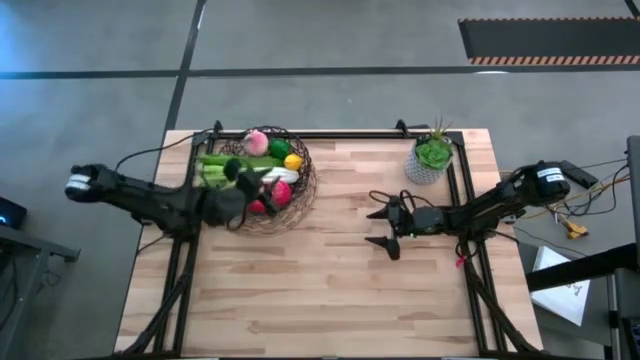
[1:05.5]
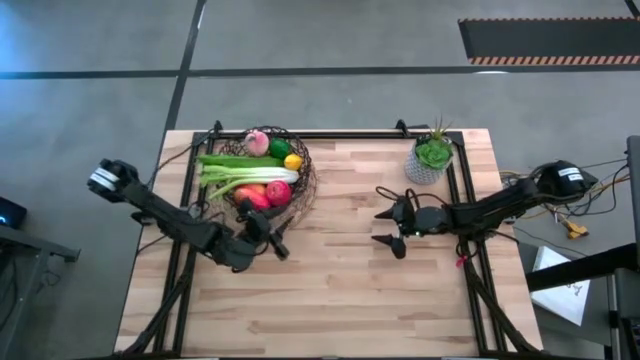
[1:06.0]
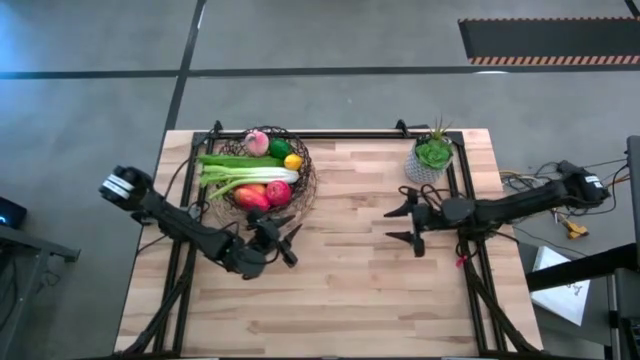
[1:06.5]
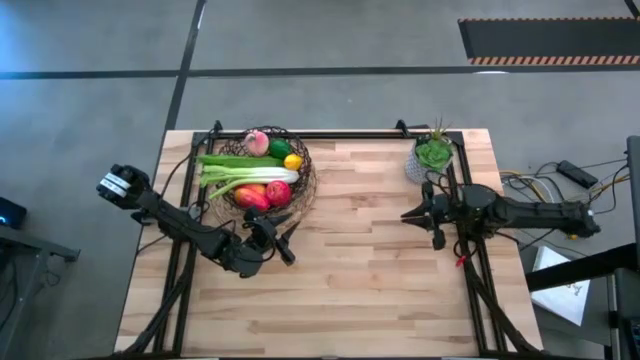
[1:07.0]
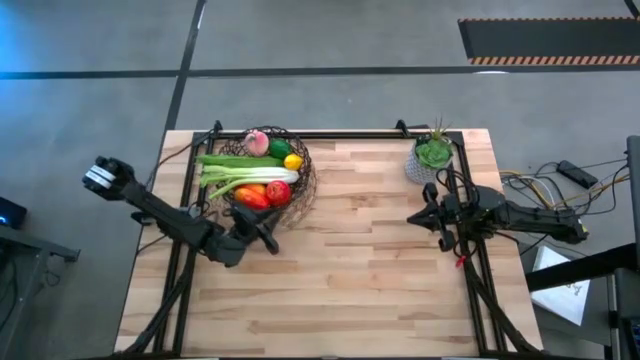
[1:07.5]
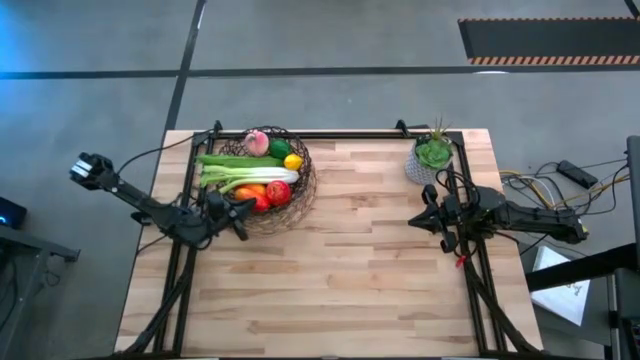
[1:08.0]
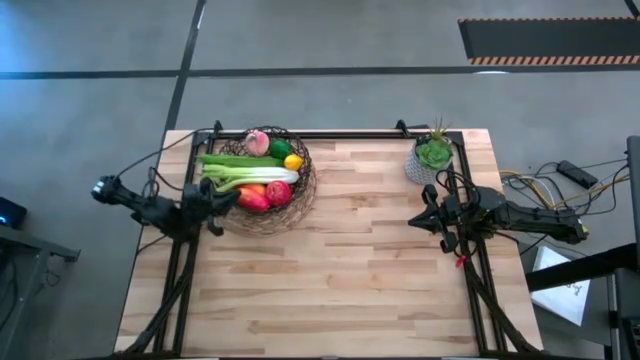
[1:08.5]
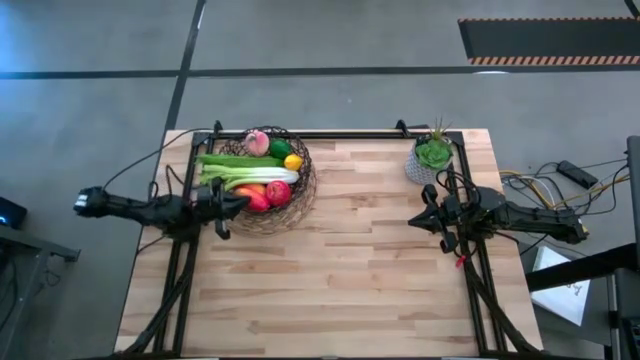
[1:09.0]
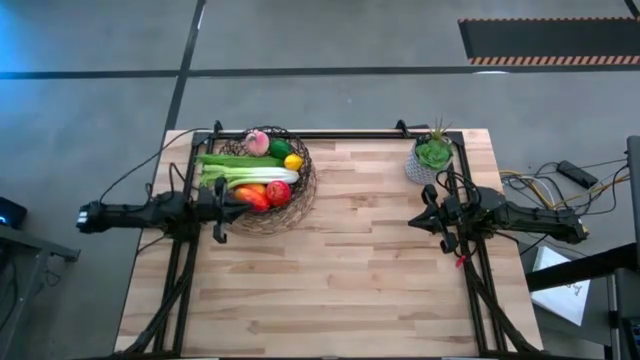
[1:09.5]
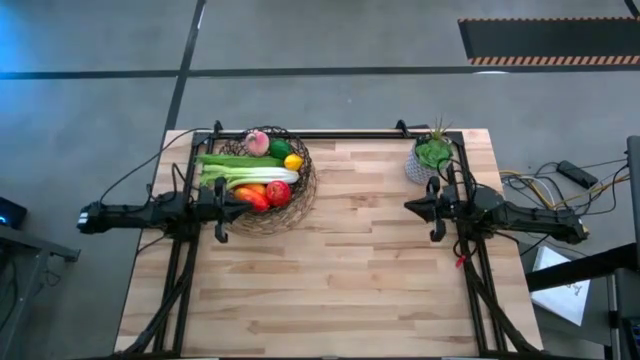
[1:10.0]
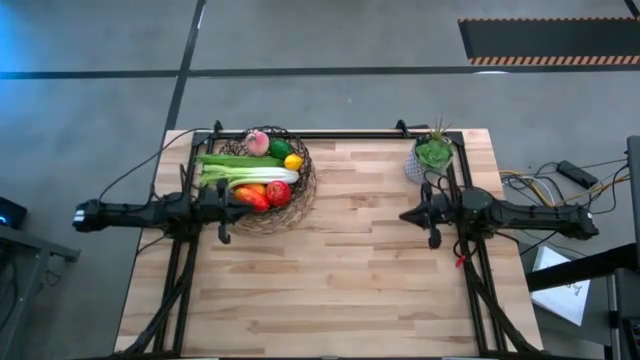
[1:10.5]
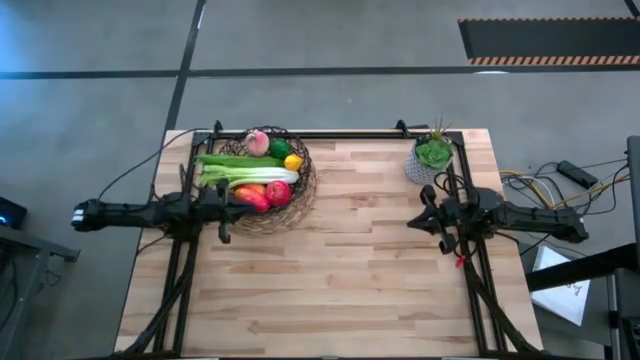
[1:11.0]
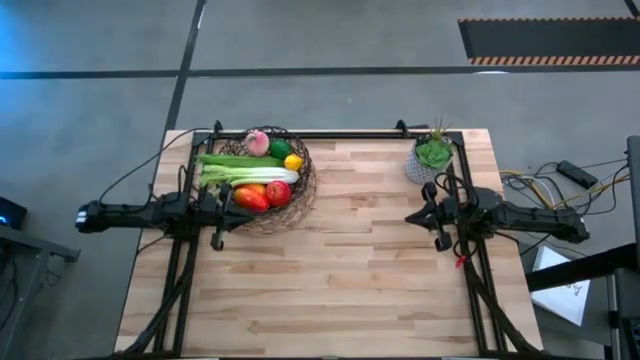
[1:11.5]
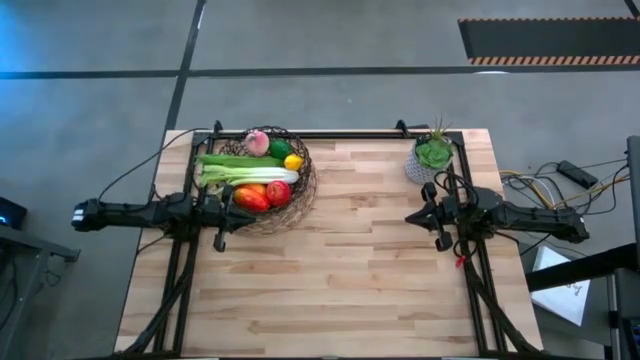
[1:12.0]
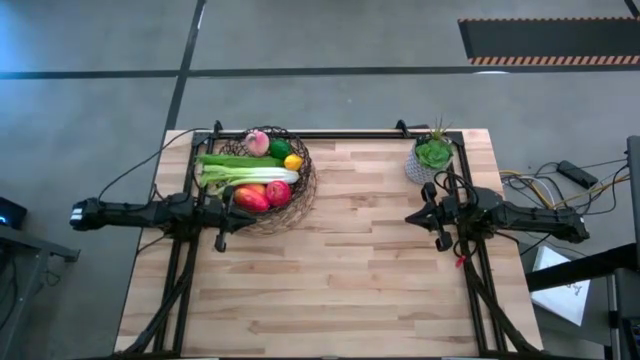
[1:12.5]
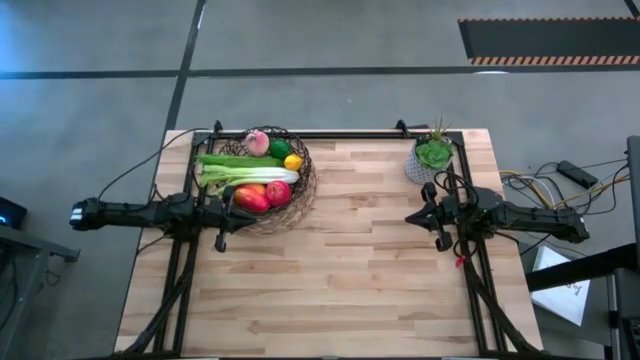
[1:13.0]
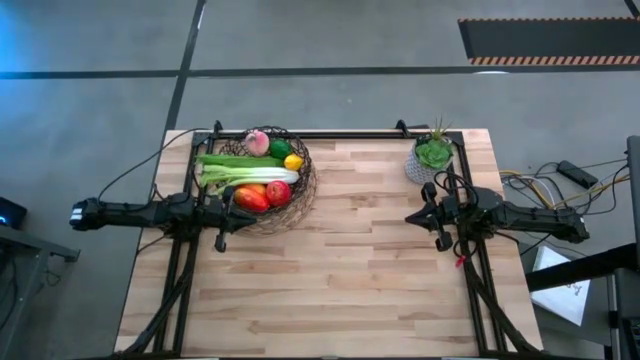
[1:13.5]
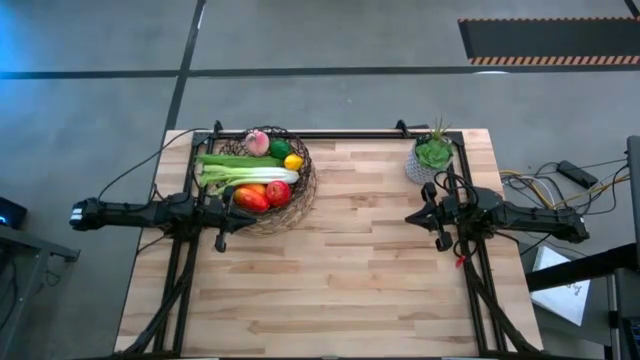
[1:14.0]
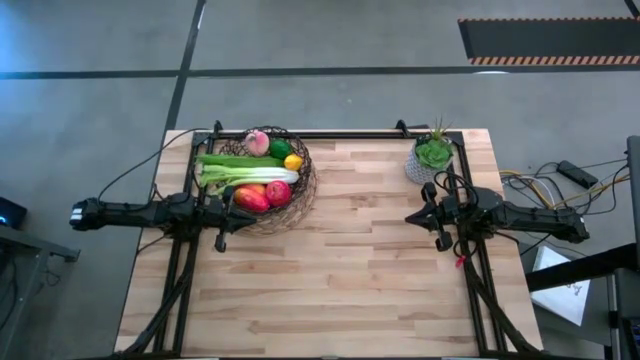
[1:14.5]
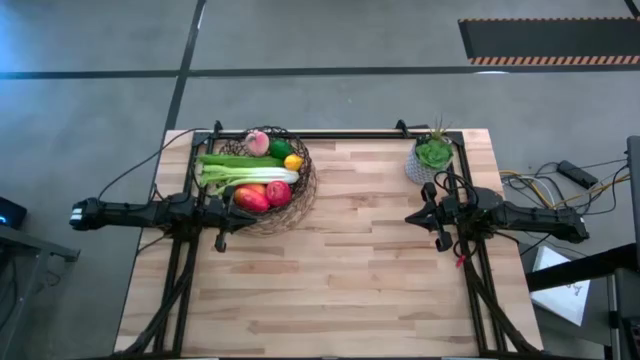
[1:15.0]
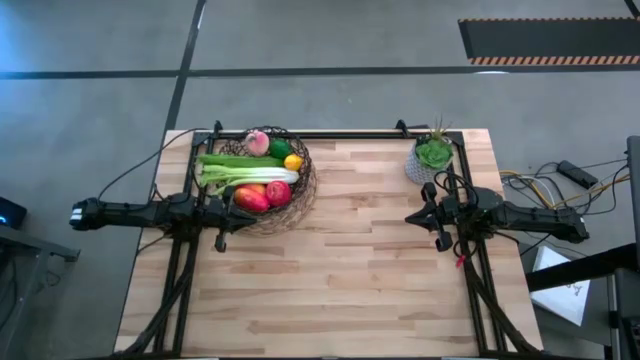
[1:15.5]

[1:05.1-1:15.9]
Task: Build produce basket
Return to Home Position

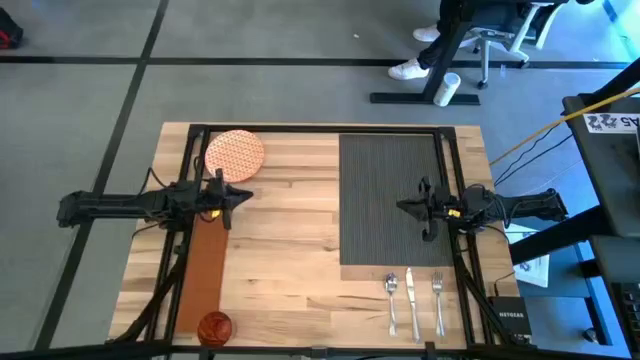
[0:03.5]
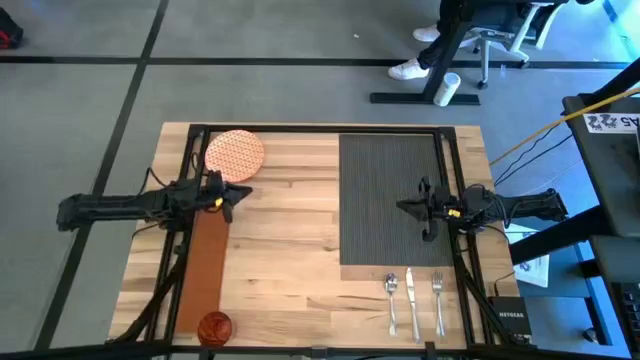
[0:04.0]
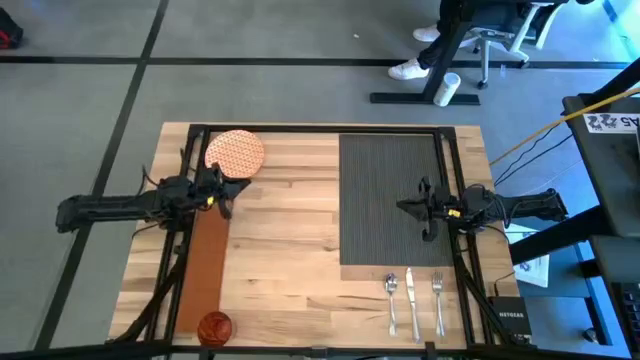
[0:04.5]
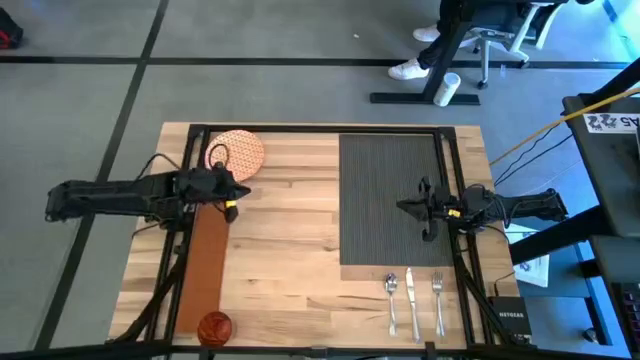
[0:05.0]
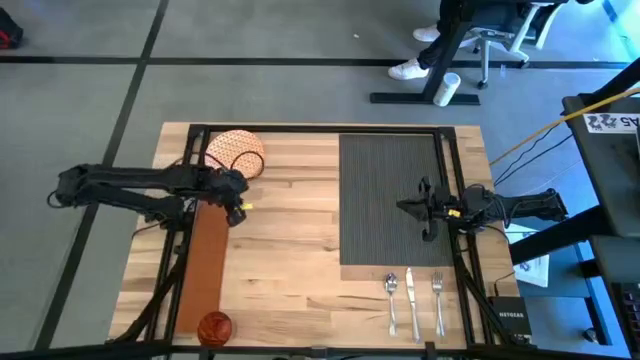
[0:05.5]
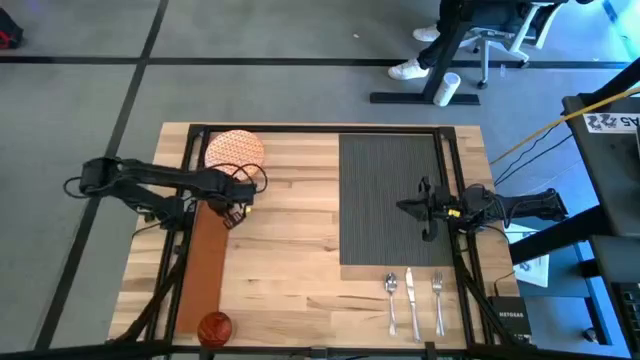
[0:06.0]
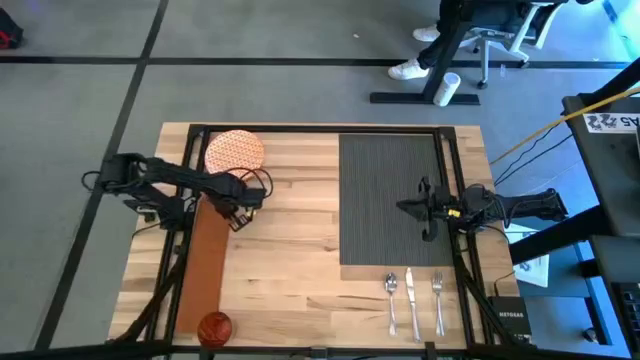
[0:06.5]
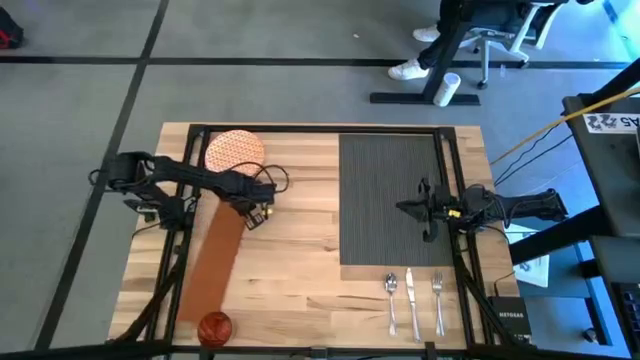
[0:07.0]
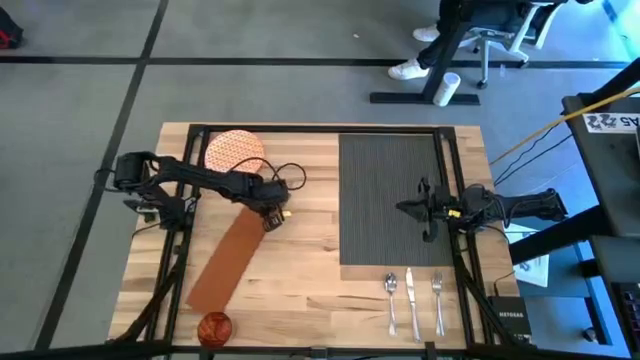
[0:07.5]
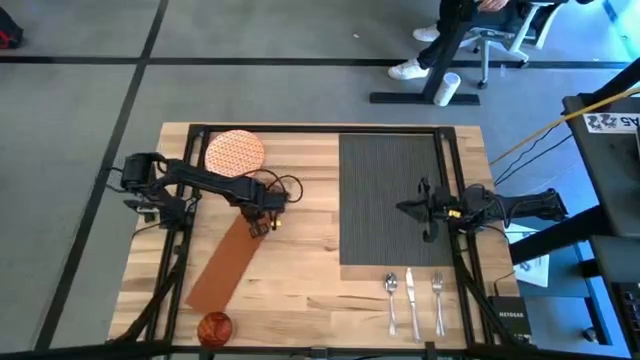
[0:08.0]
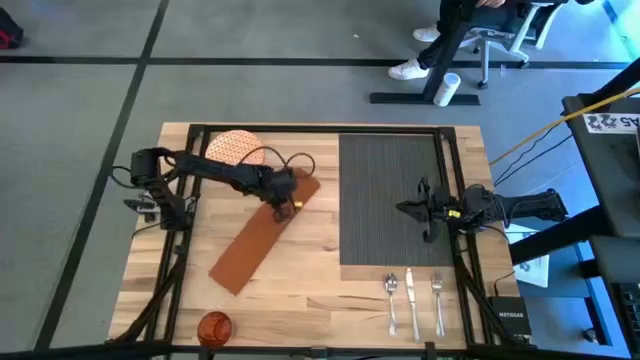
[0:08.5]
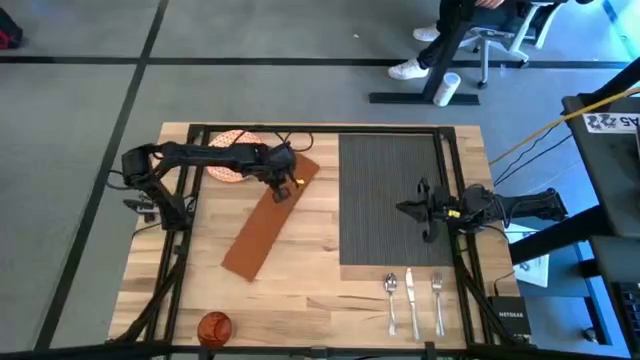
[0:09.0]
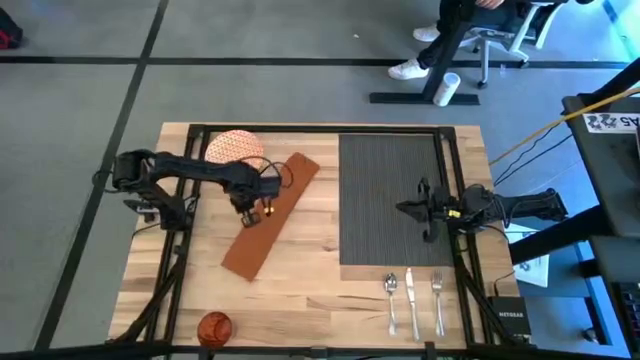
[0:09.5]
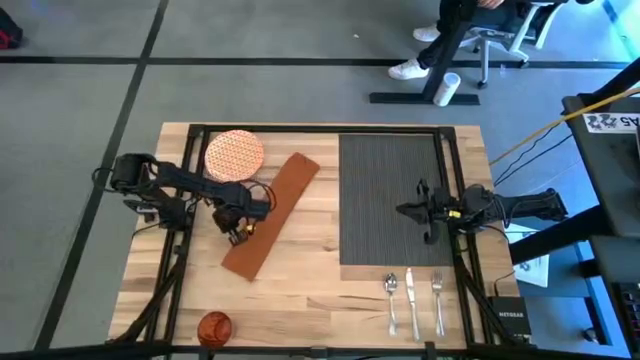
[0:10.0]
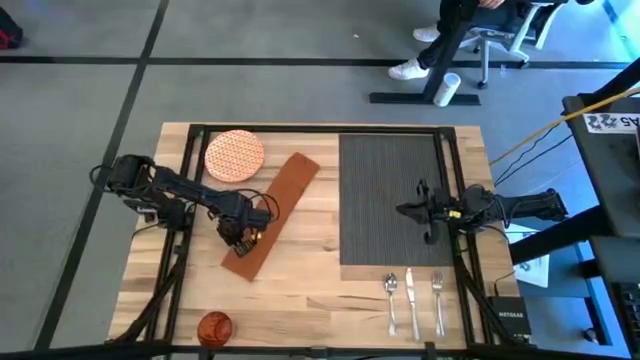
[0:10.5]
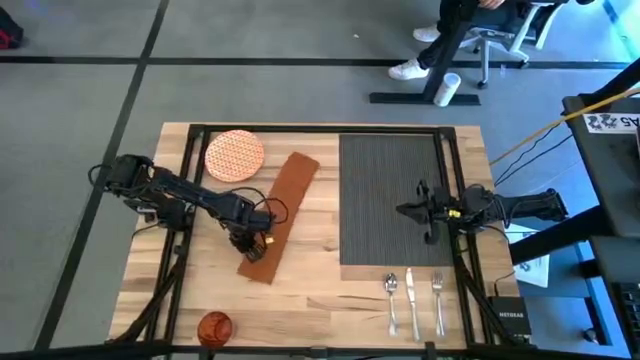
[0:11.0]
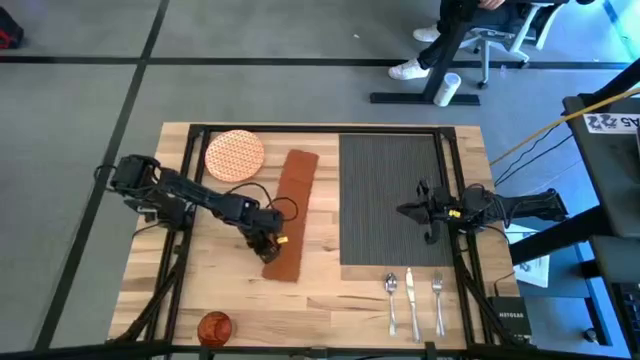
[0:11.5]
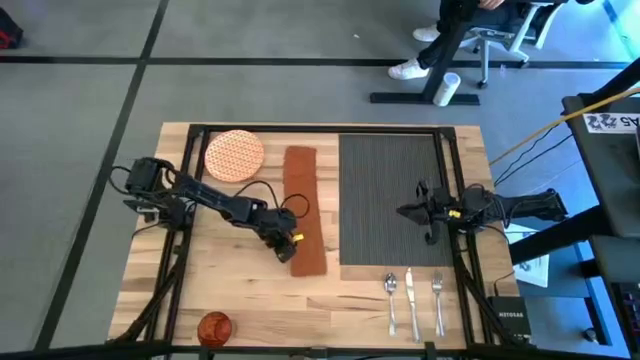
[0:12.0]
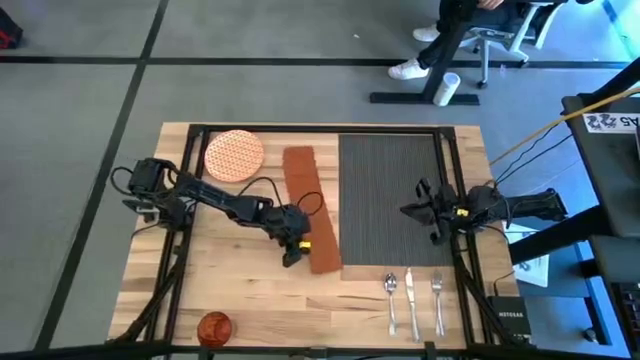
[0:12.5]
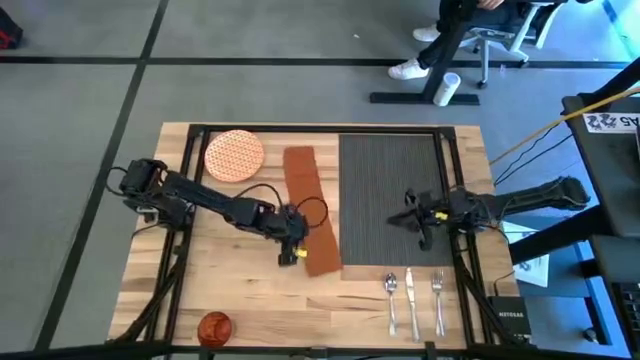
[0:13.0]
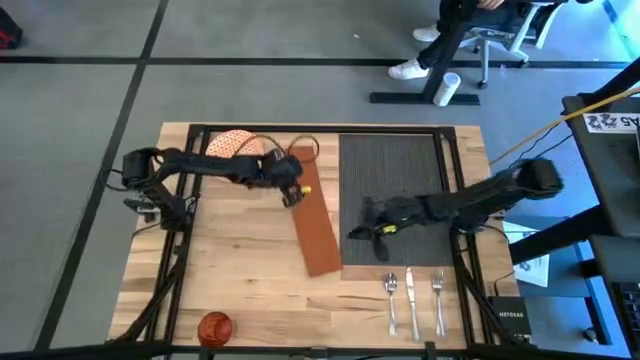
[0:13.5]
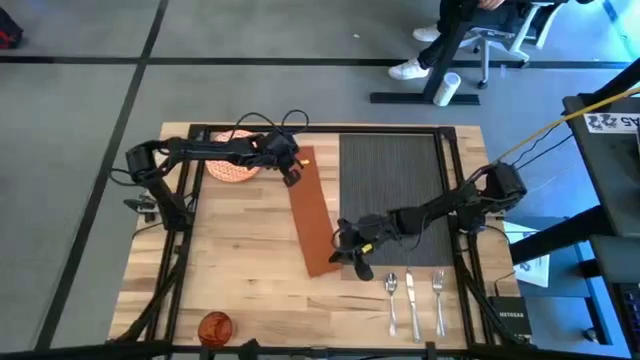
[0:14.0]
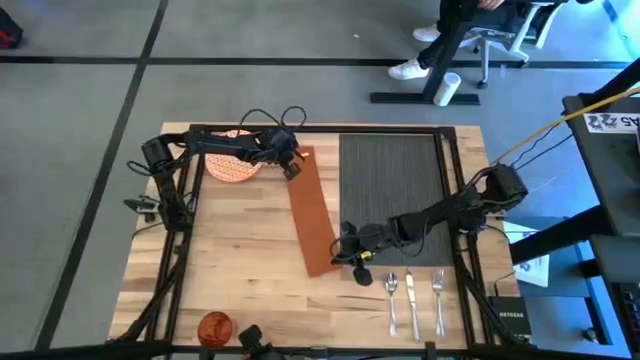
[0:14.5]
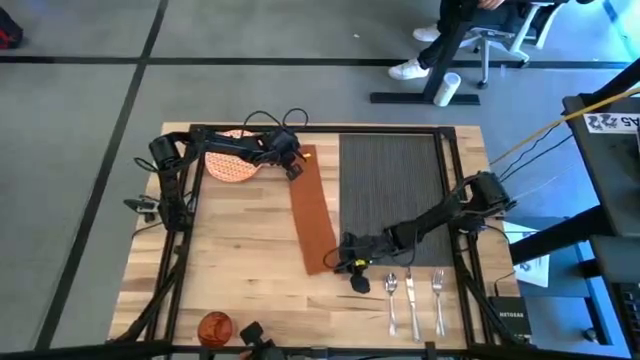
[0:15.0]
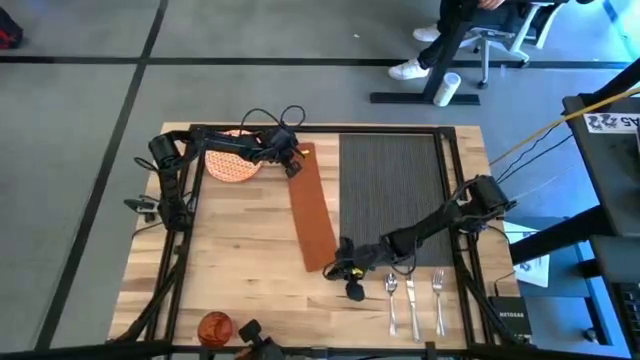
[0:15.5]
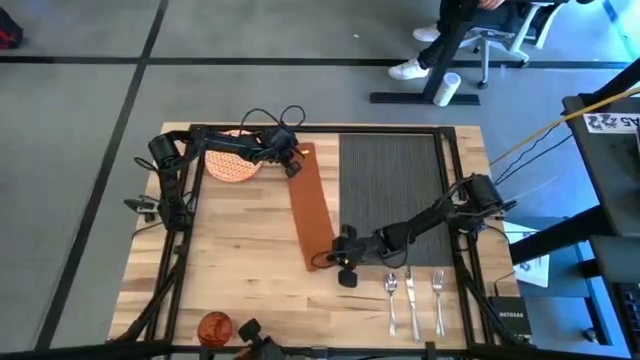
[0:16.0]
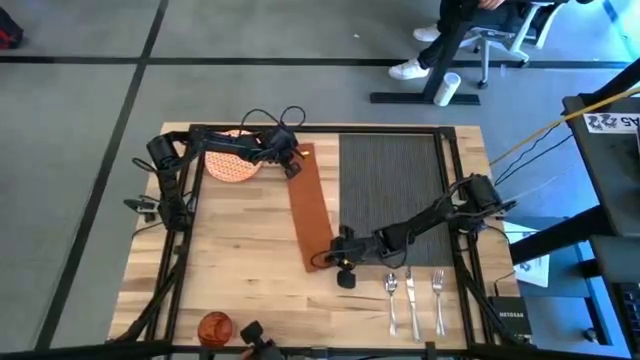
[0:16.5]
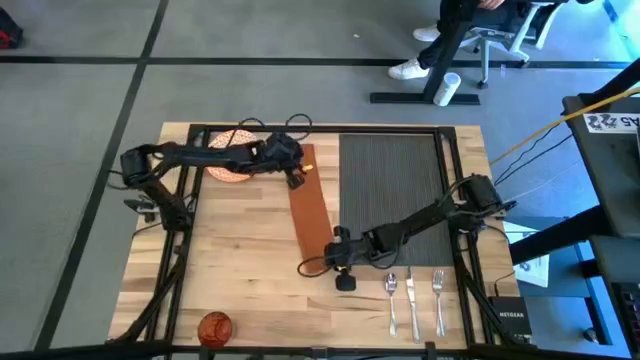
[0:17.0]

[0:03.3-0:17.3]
Task: Set table place
Fold the orange table napkin
